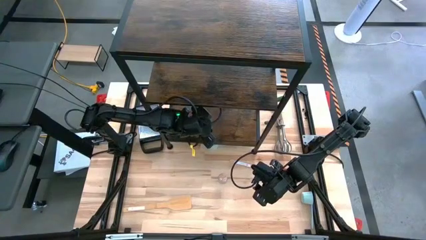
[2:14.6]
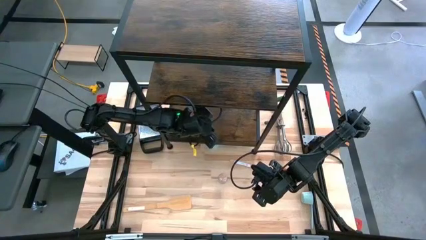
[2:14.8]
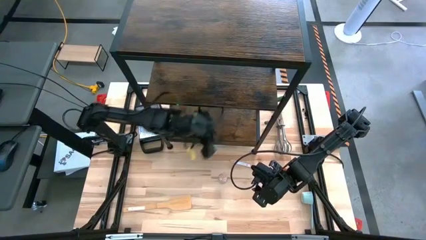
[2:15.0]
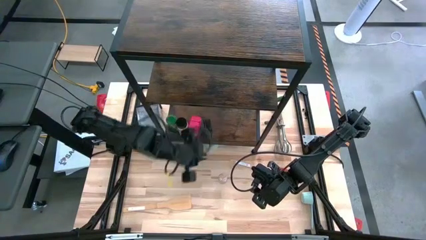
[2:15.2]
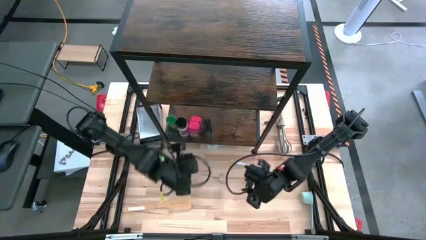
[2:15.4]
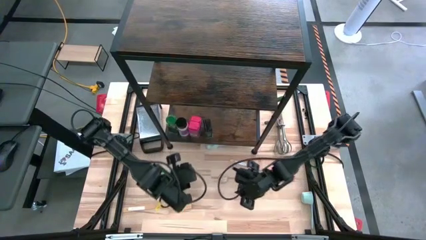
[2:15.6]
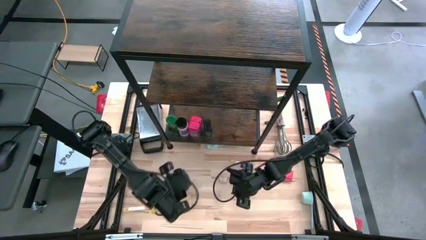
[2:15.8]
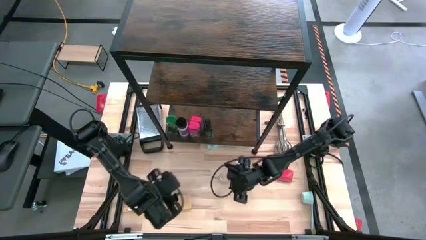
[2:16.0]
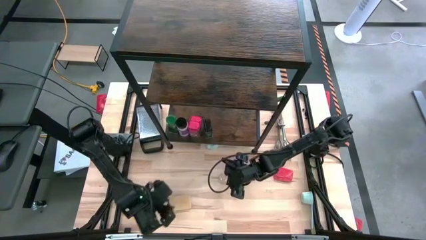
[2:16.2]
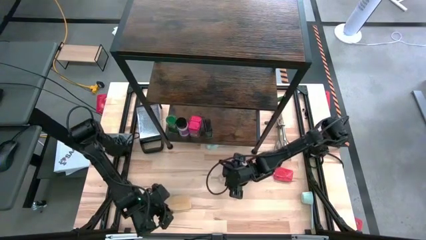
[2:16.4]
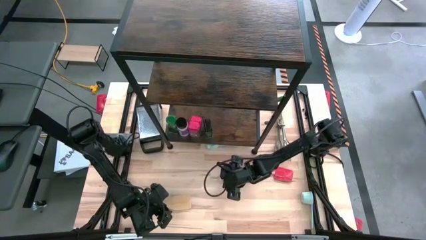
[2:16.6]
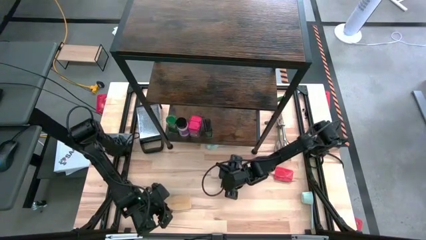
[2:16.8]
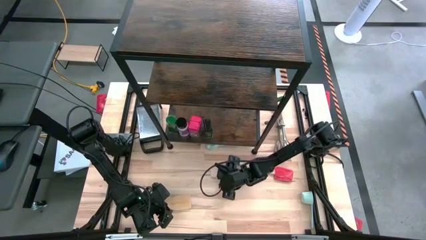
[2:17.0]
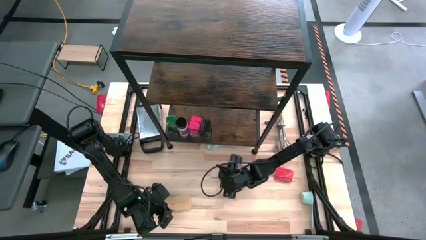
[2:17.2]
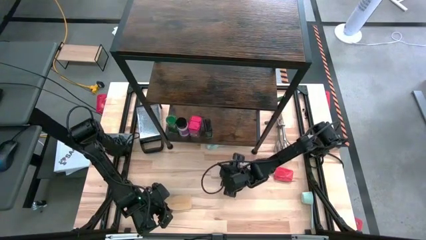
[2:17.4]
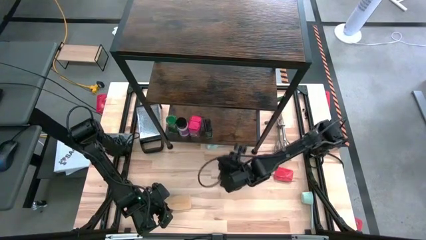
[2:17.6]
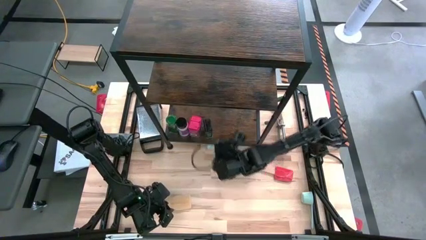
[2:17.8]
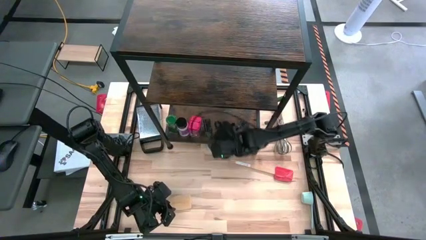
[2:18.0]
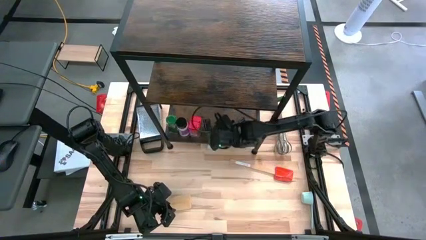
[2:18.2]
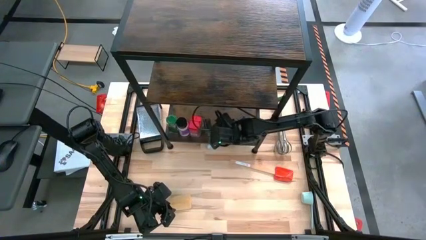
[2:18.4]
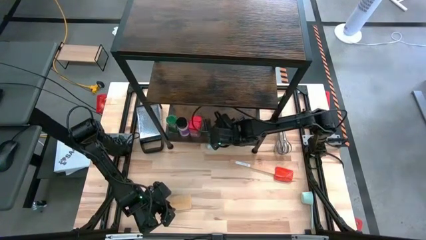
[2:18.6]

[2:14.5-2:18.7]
Task: Shelf spices
Put the brown seasoning bottle onto the shelf

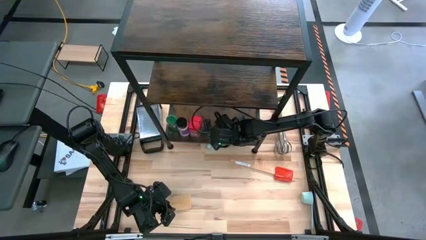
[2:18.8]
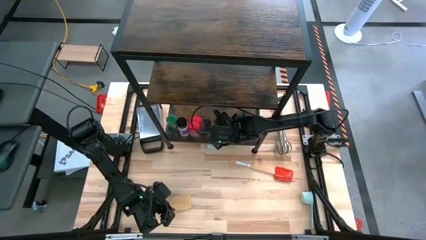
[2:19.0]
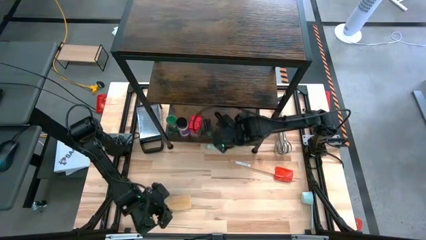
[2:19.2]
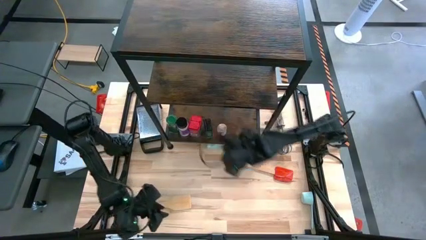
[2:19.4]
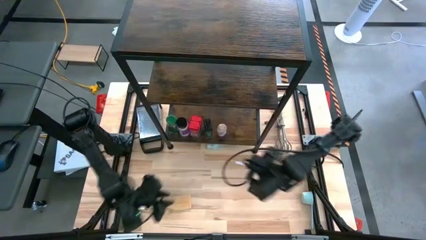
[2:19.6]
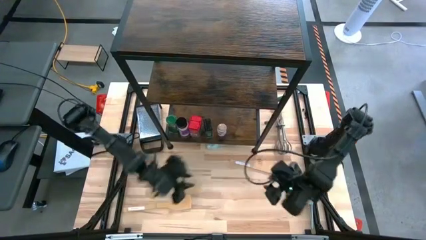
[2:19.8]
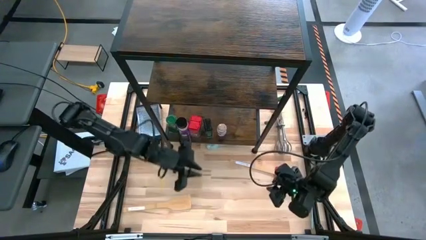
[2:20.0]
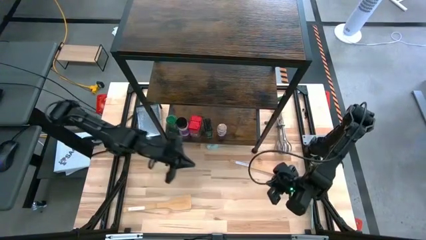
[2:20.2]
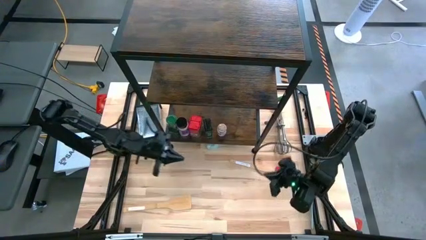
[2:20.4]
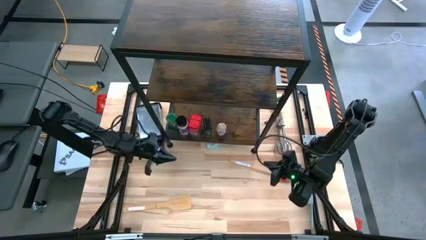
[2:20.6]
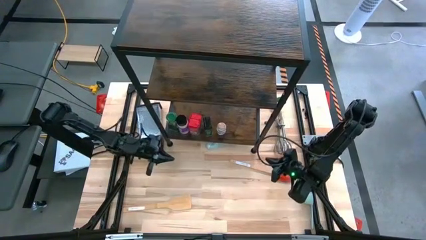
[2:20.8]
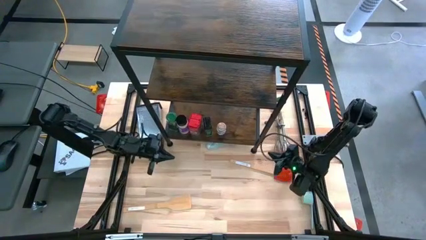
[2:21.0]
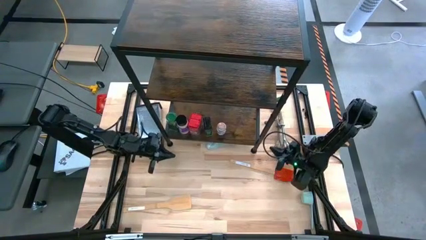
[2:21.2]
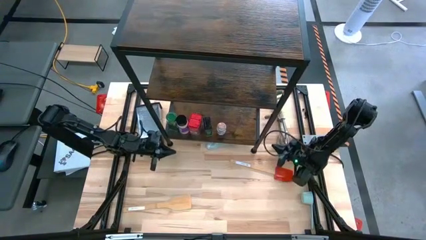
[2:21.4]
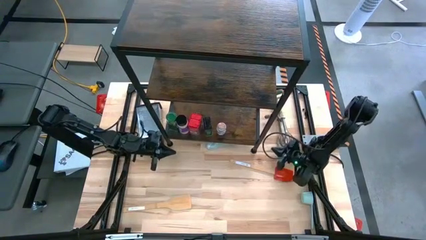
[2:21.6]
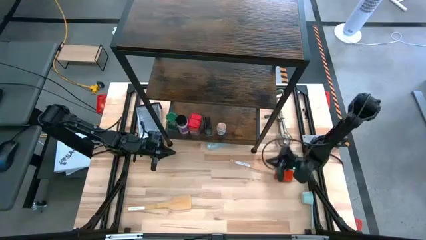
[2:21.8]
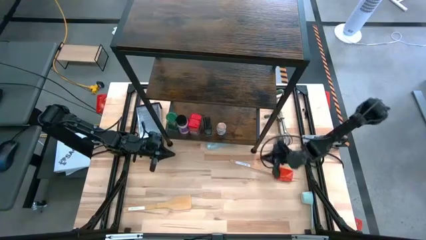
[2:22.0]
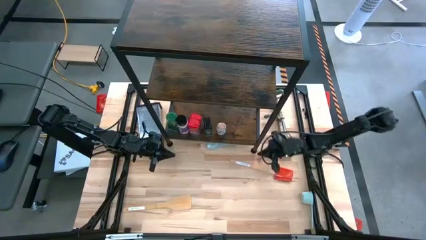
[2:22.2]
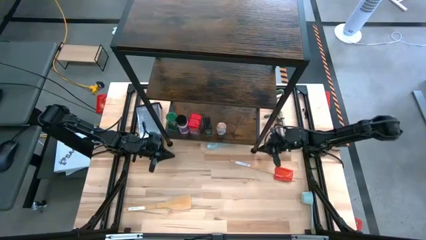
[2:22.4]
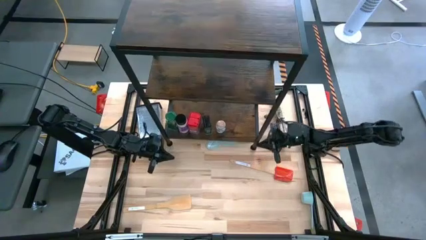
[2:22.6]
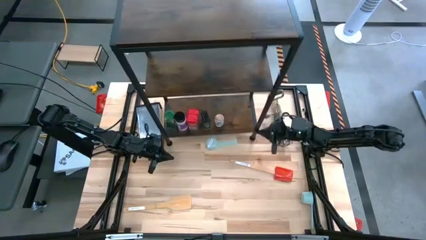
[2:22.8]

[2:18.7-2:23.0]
Adjust the shelf on the table

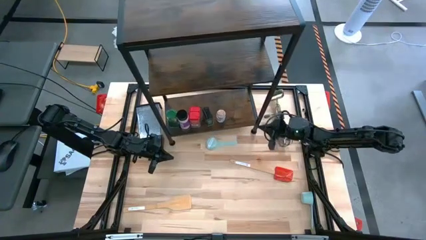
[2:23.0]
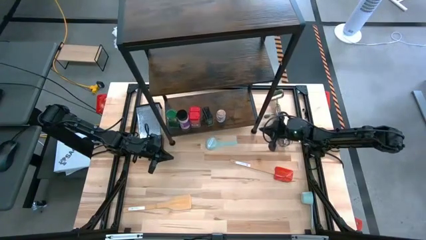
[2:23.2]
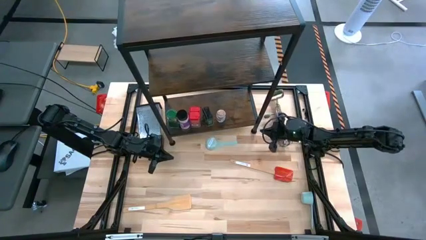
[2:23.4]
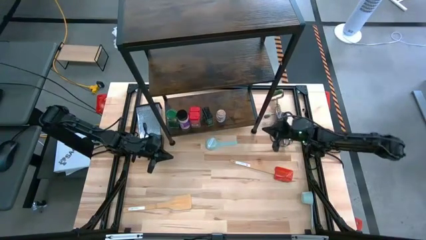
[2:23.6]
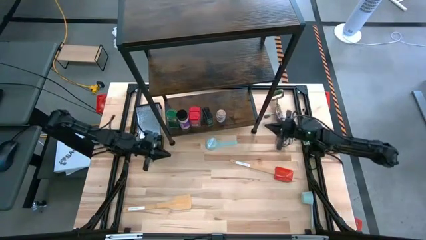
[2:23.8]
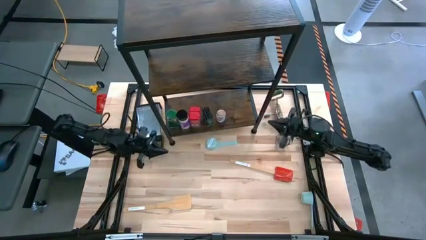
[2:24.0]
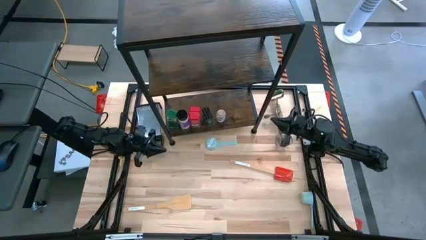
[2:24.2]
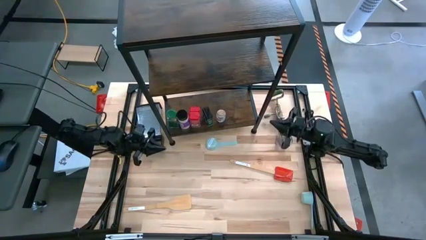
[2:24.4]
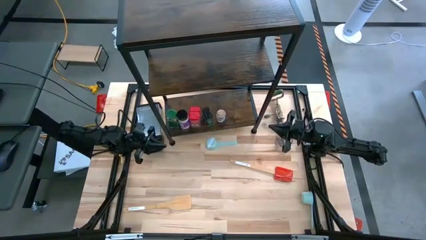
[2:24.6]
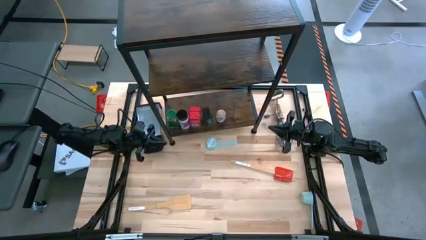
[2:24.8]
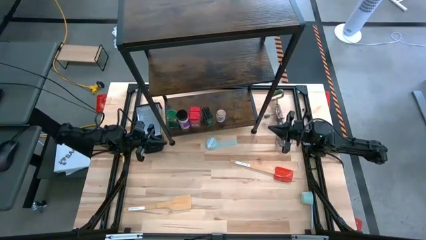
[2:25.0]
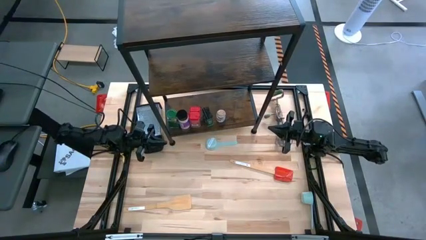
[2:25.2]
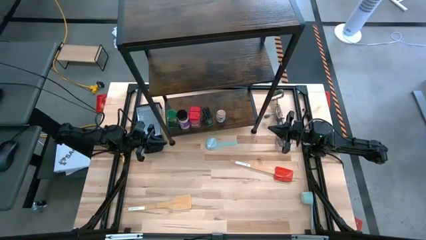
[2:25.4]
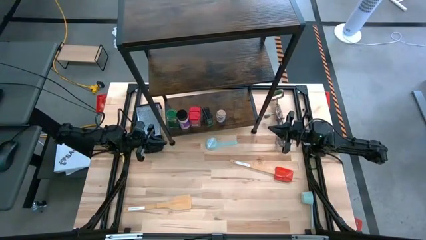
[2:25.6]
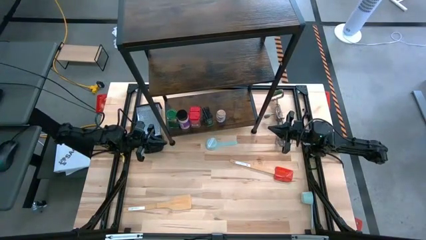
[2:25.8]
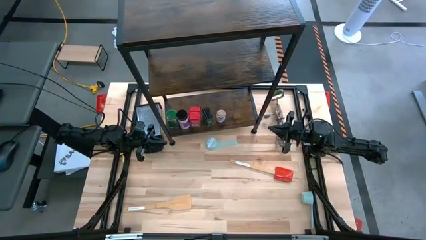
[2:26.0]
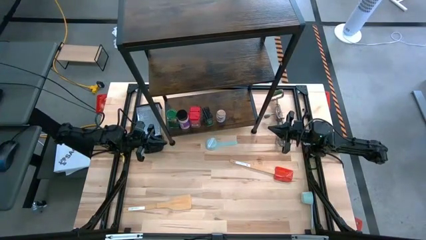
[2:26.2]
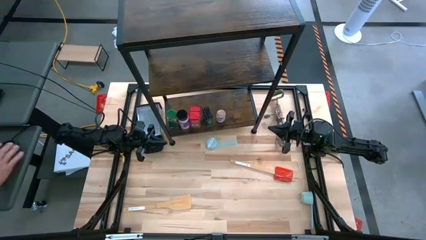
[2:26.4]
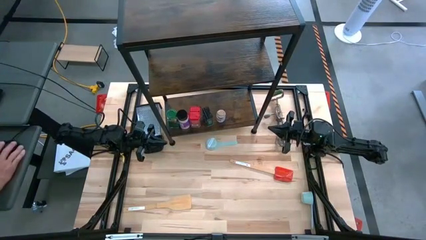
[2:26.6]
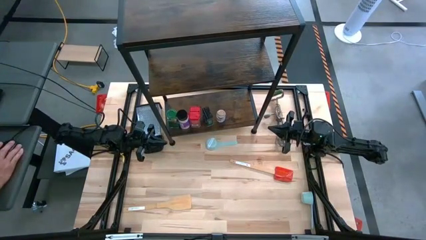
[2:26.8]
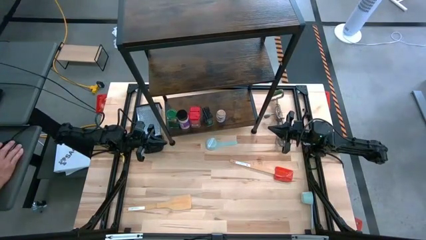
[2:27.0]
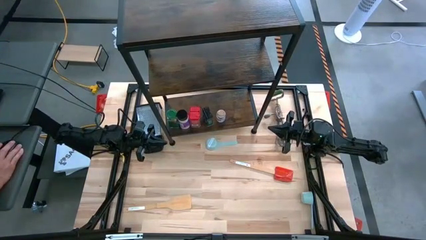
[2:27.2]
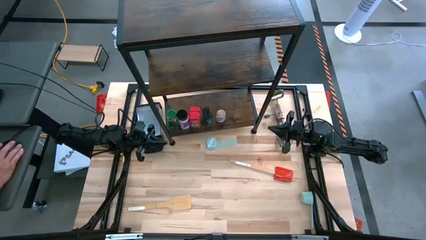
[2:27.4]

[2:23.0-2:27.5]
Return to Home Position

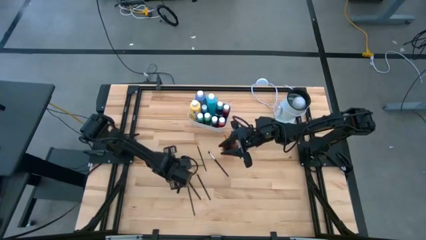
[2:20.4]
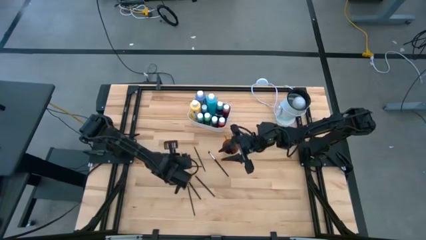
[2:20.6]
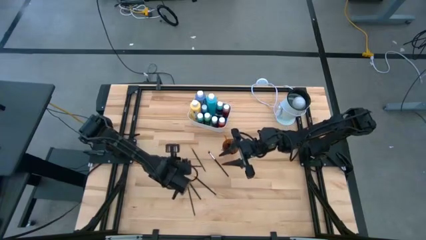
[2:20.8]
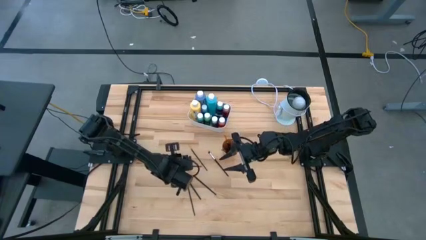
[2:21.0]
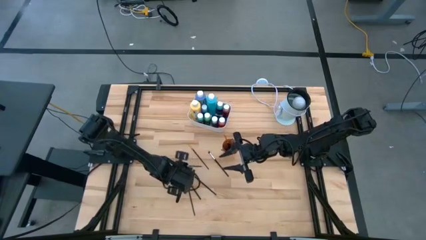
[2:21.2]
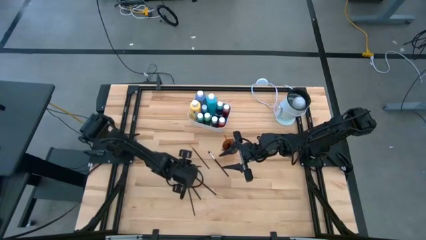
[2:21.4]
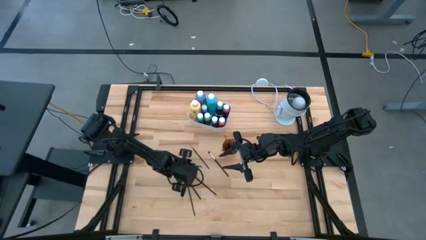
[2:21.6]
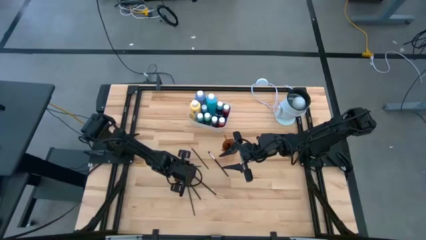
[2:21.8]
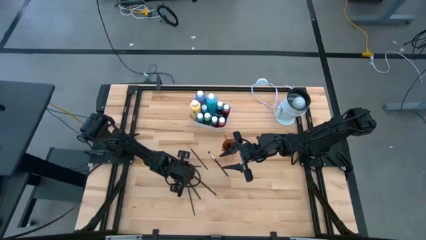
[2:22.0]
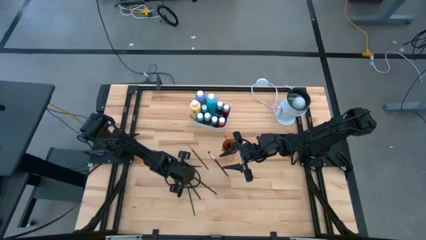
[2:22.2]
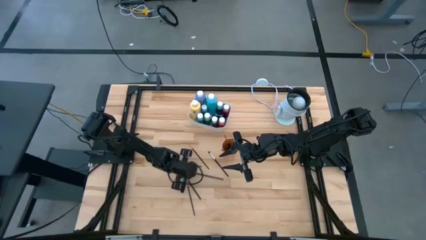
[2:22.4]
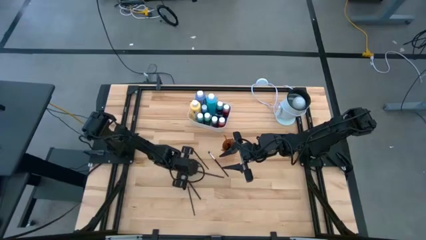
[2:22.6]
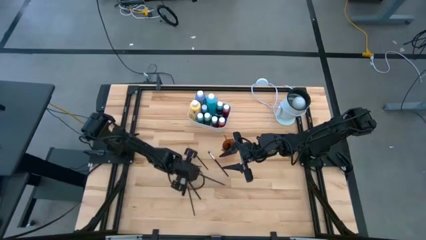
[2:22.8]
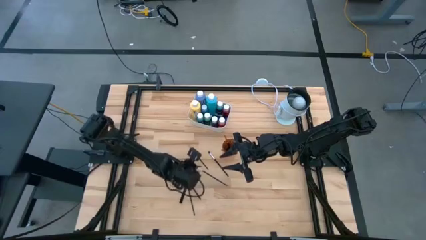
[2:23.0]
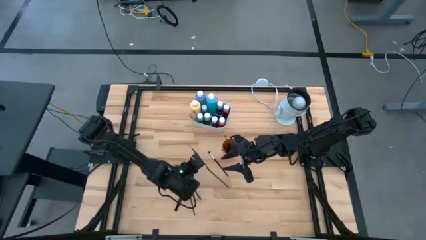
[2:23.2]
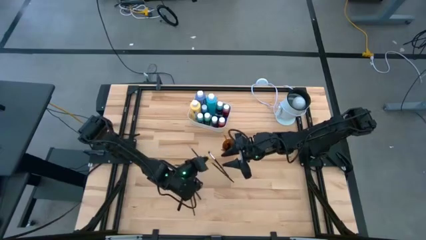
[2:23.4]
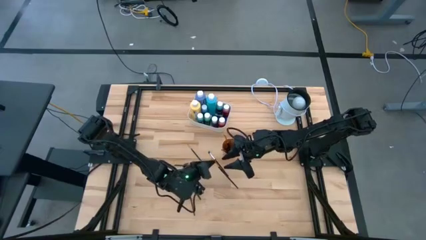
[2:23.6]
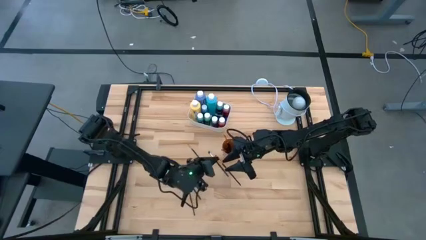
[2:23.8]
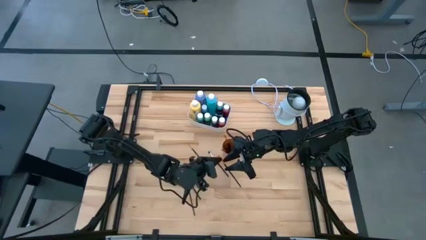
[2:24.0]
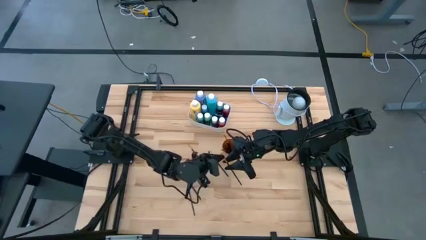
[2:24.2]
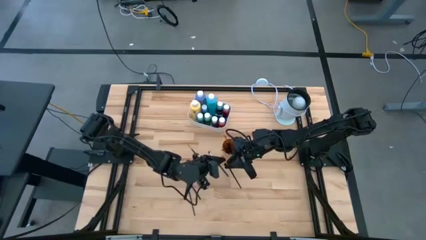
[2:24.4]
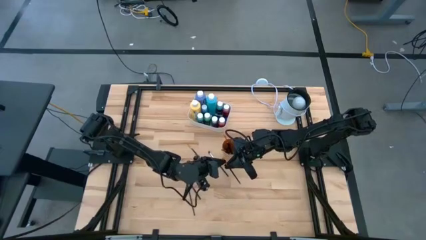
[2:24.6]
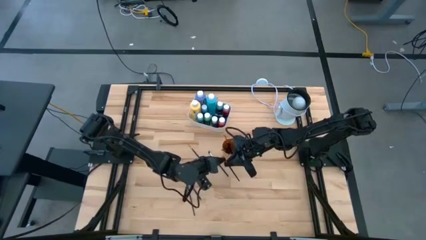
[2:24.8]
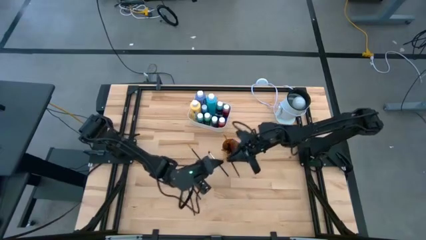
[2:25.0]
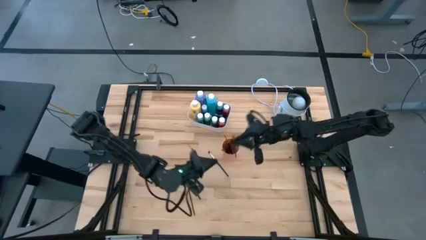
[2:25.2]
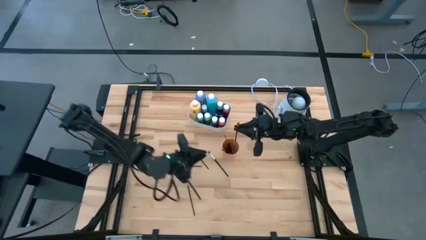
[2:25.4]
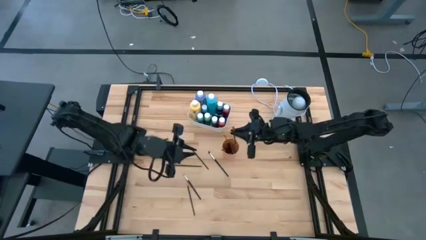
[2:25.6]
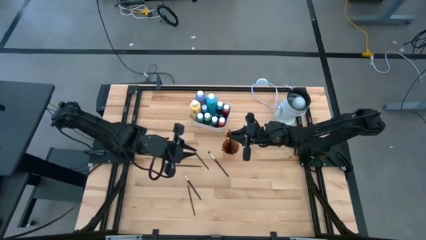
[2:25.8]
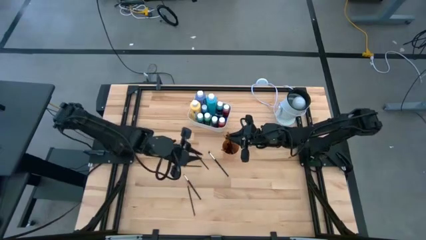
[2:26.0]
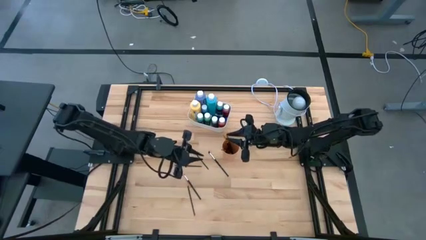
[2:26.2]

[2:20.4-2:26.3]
Task: Pick & Place Paint Supplies
Put the black paint brush into the orange cup
